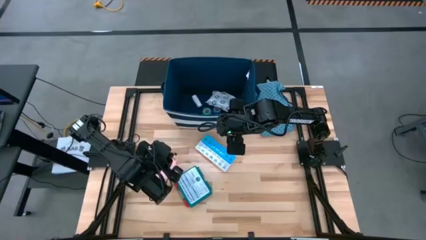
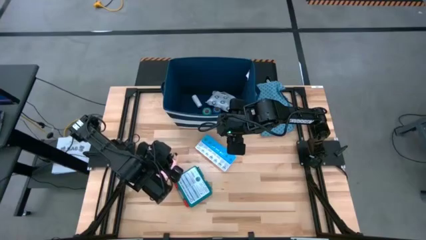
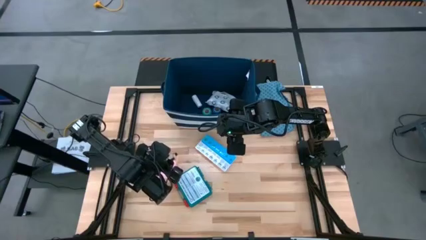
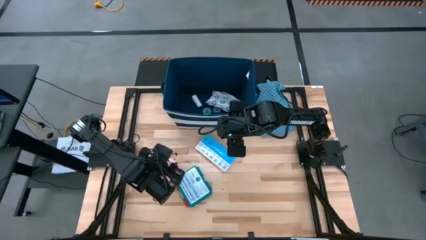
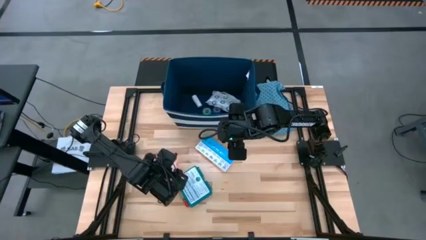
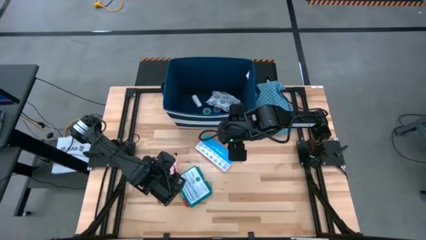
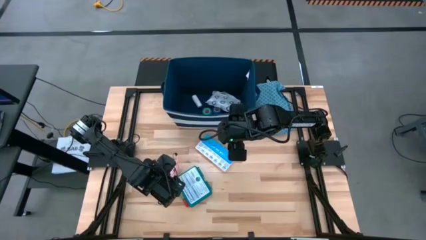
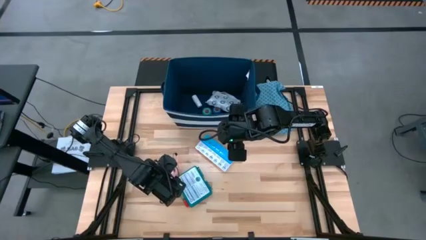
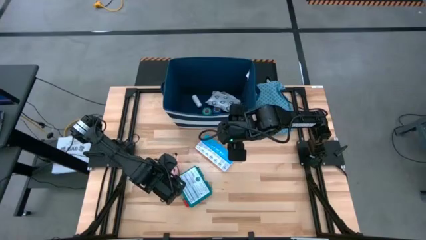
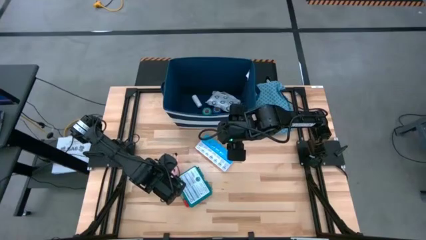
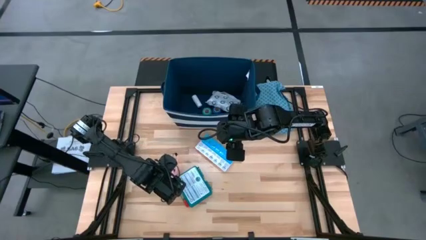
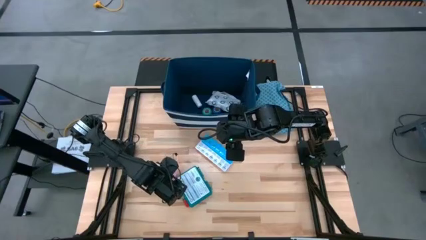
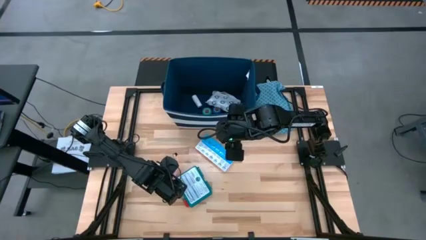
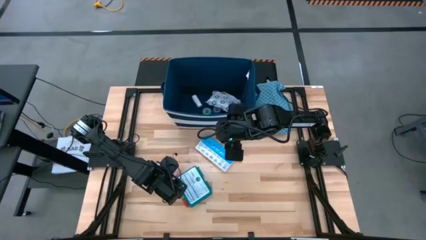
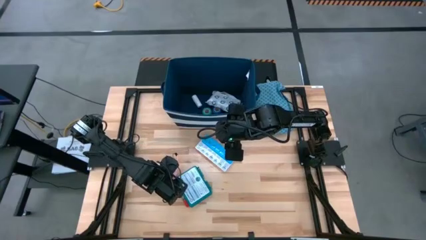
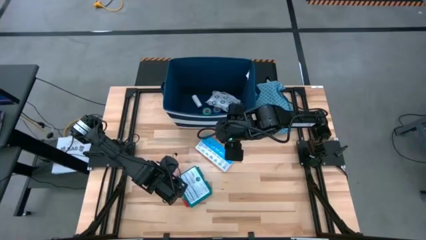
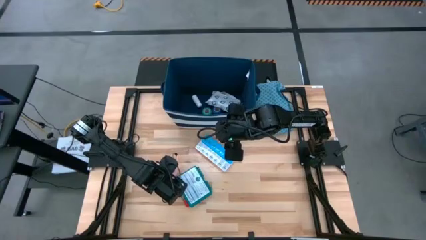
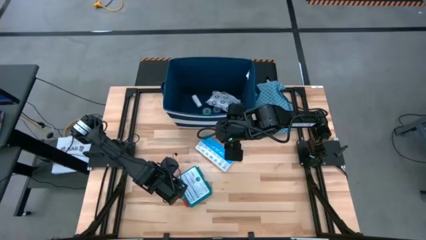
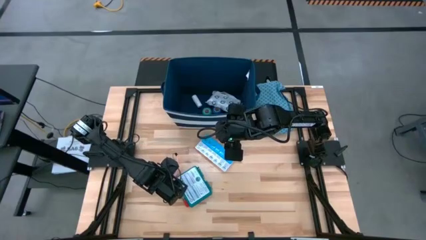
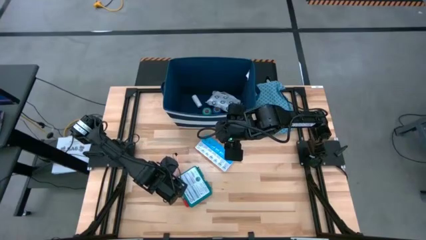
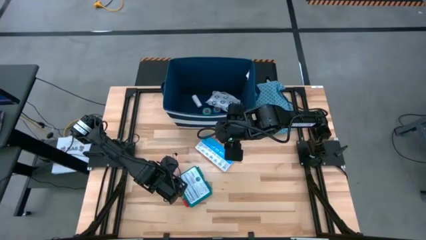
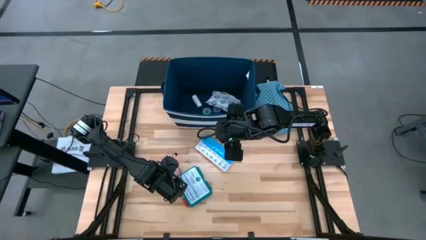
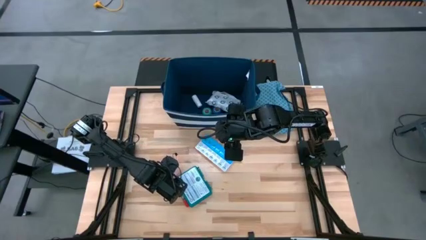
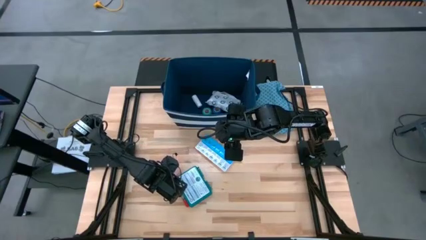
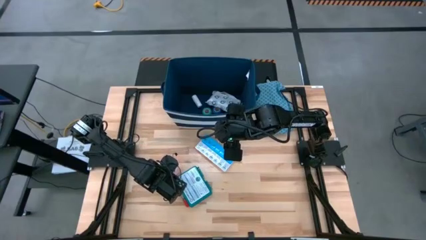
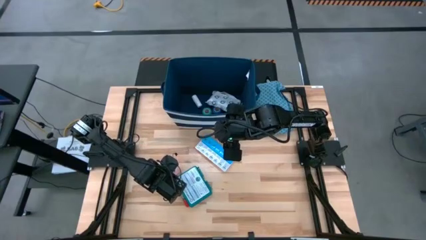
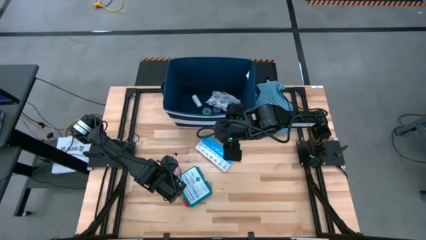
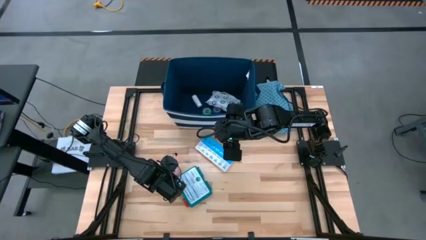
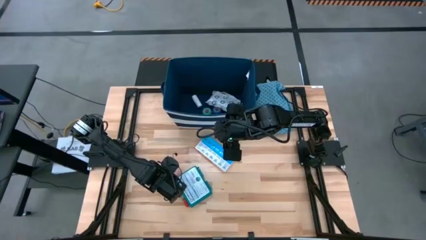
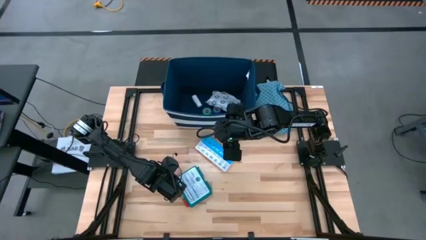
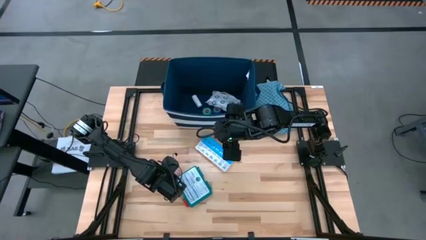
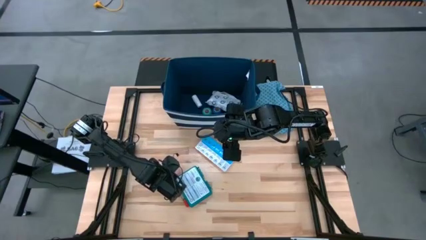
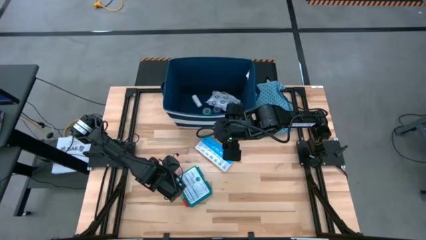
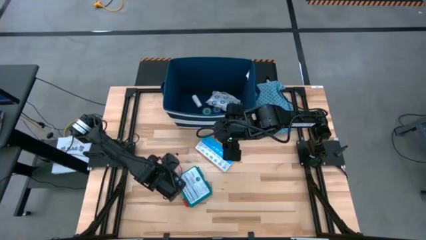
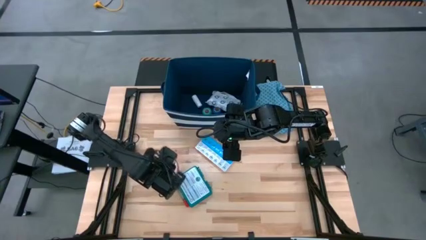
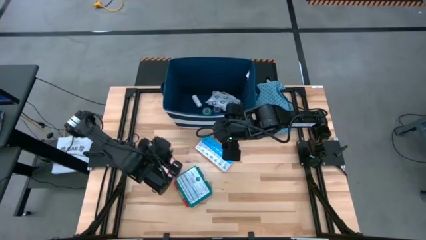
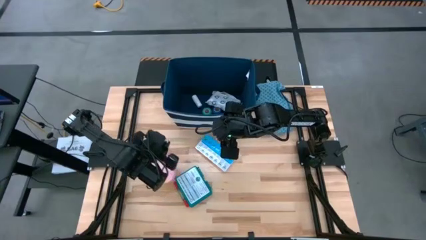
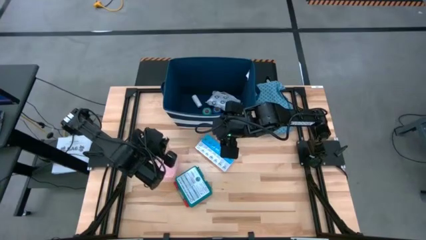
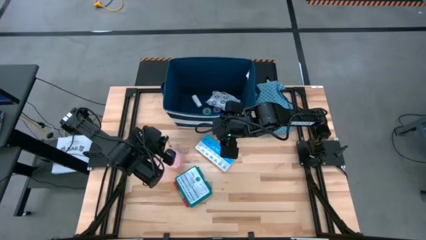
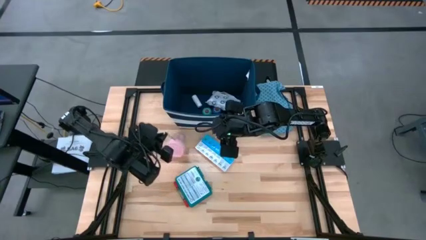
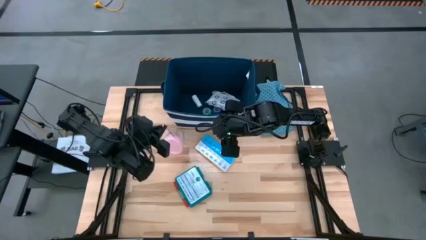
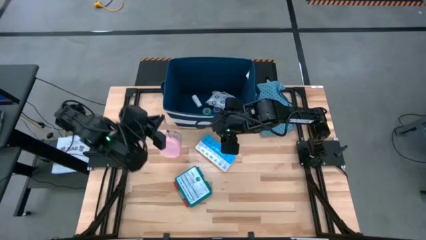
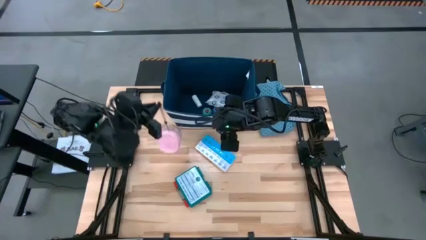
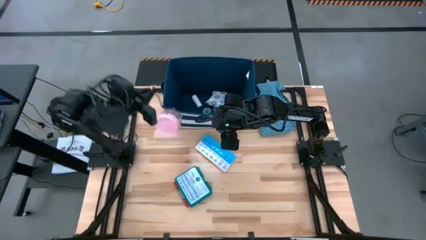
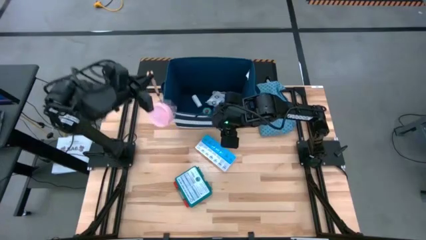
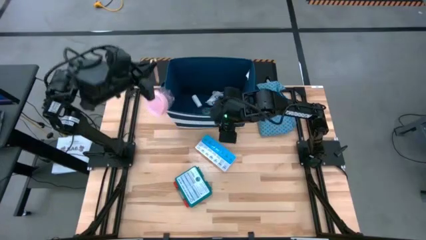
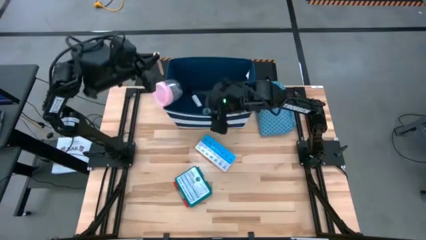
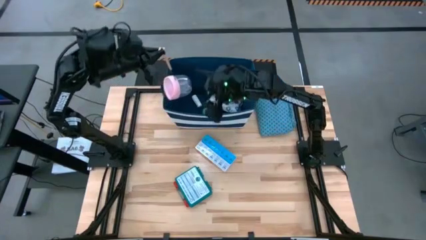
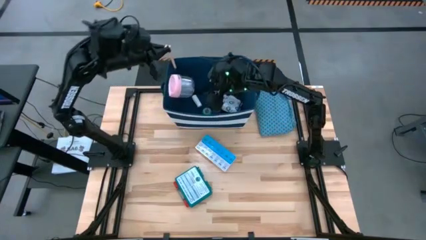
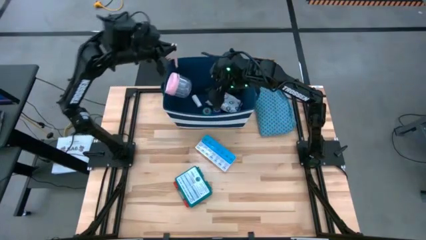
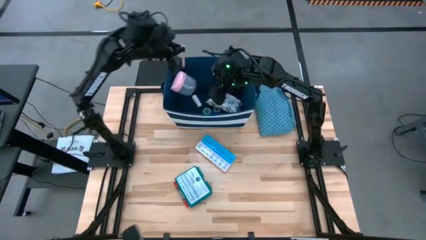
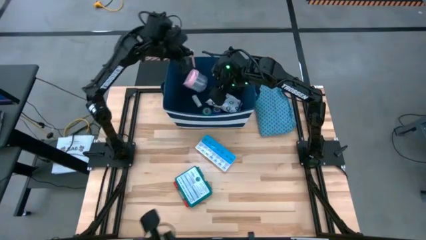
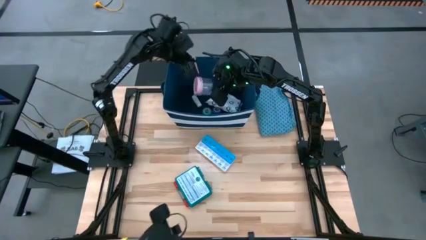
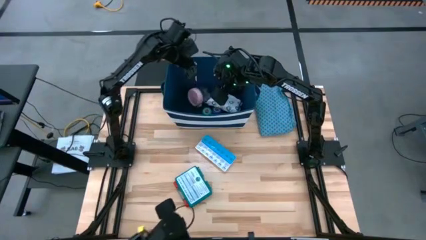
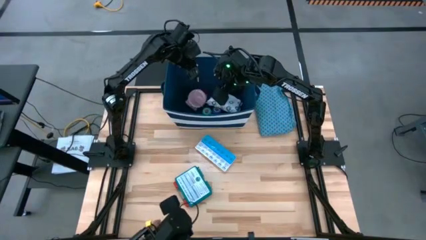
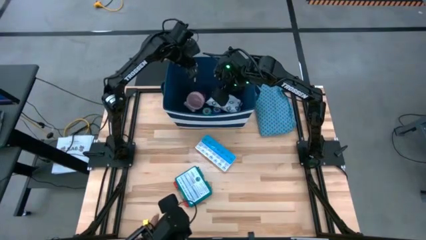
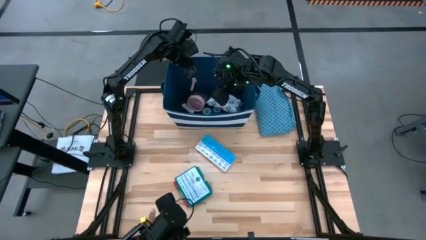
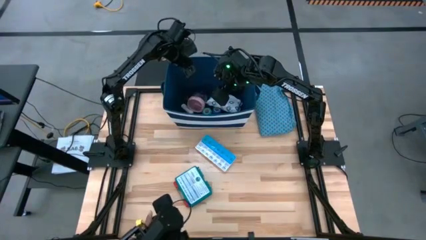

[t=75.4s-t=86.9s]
Task: Pick & place medical supplies in basket/bin
Put the pink bottle into the bin
